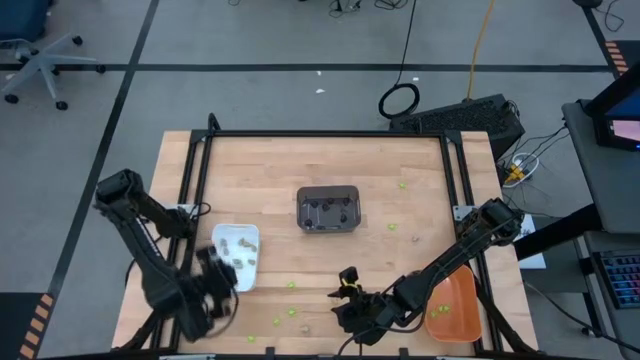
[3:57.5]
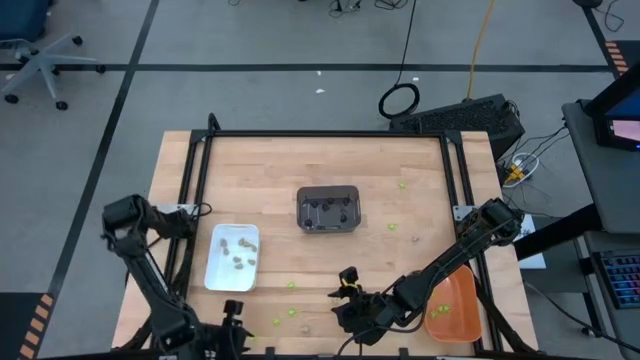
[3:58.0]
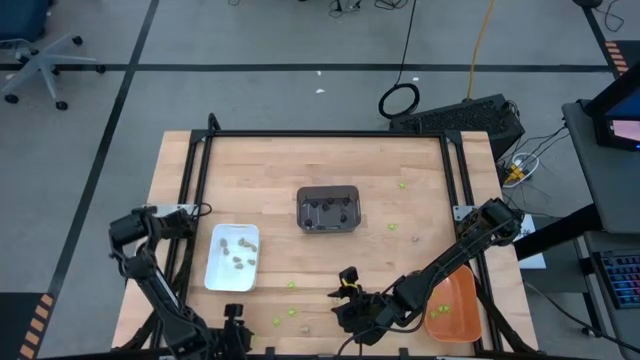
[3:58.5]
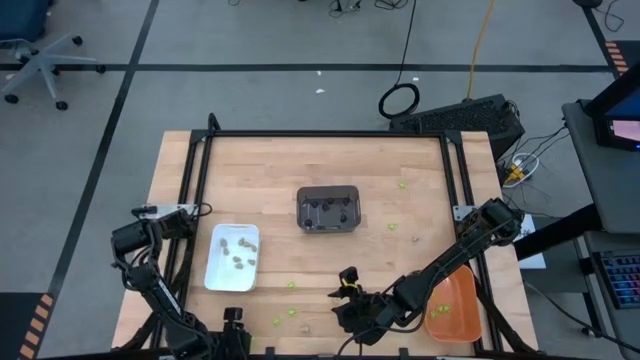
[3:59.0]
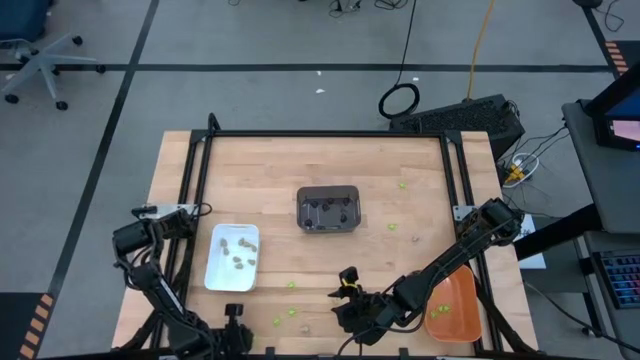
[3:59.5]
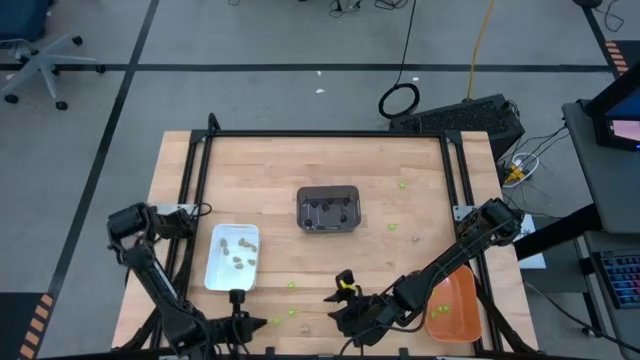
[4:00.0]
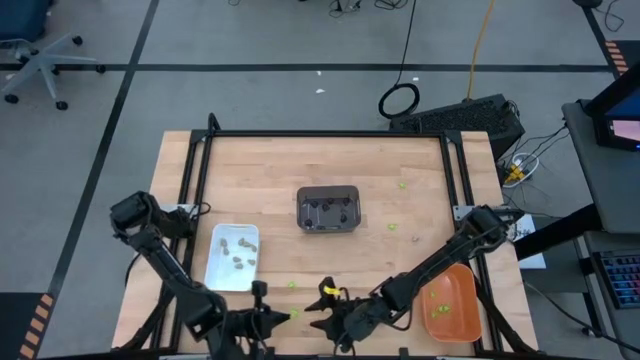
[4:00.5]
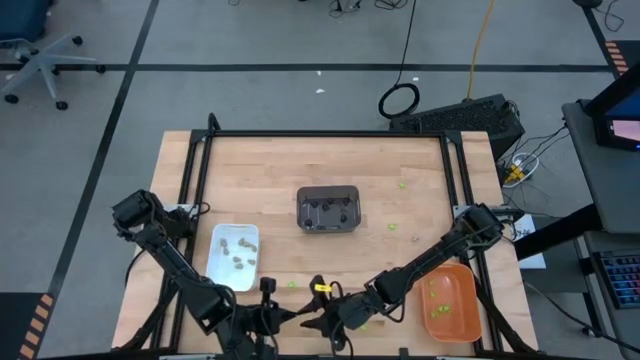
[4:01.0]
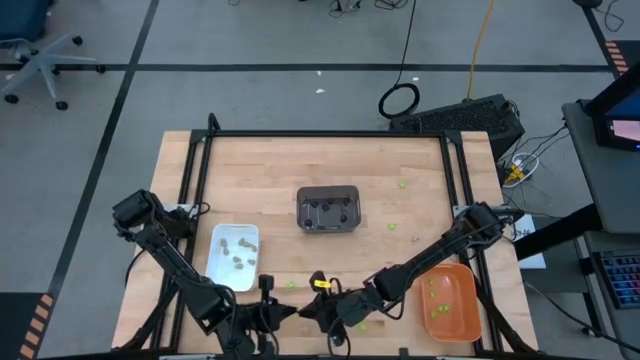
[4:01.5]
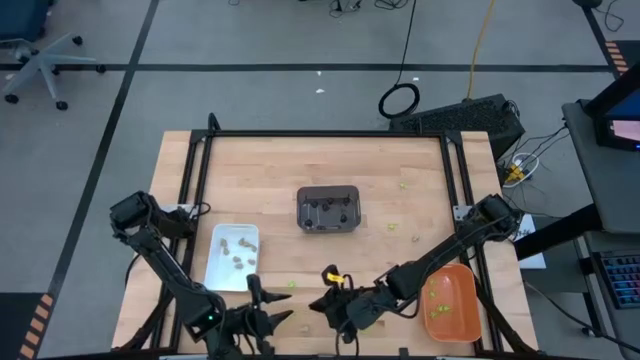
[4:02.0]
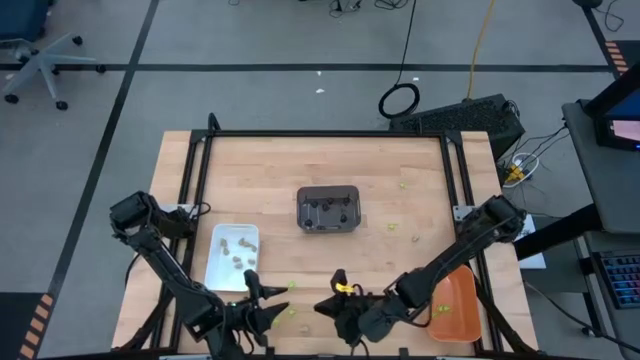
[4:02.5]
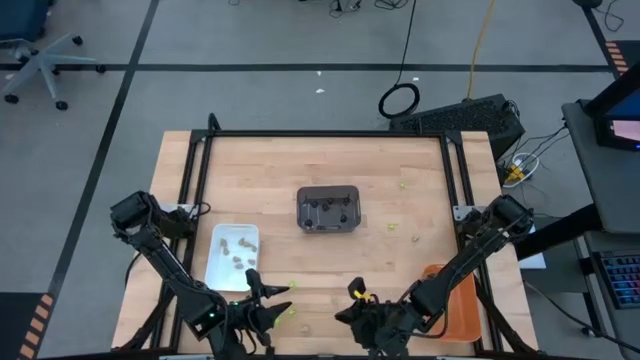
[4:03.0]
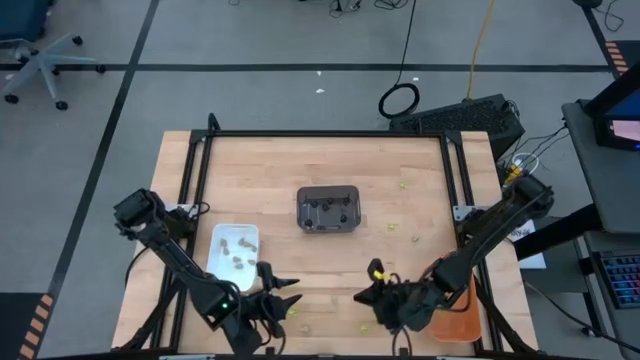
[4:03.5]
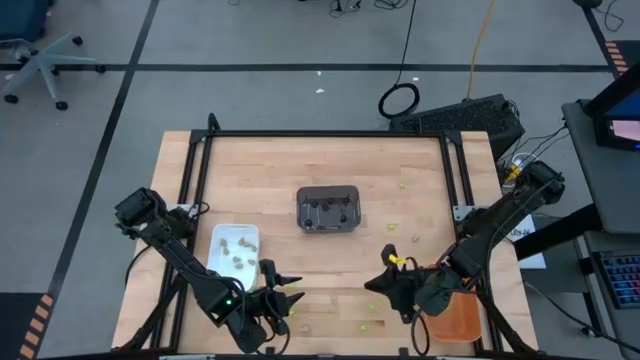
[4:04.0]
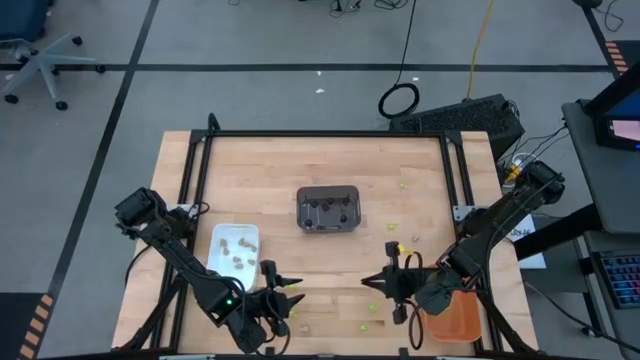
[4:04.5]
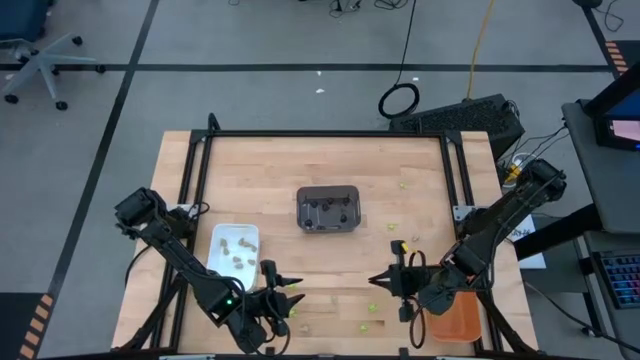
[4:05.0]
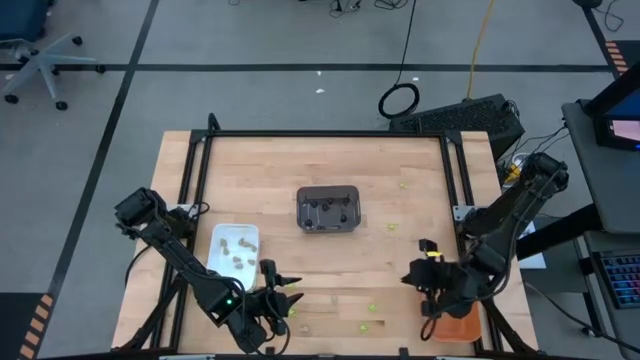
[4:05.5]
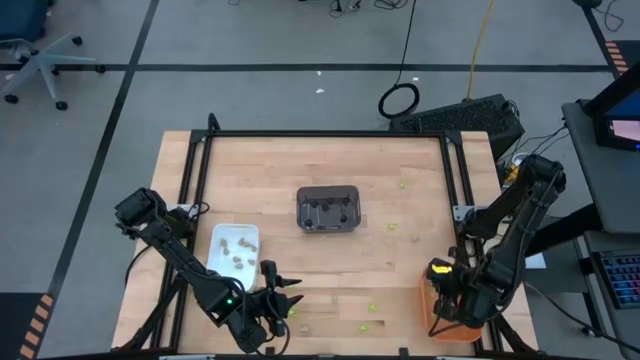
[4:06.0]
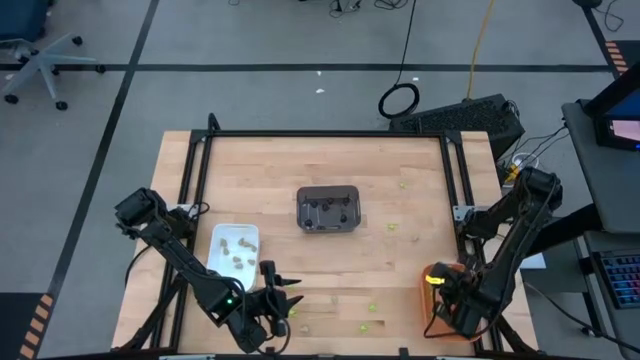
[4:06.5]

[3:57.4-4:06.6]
Task: Sort Halloween decoration
Put the green spider toy into the orange bin

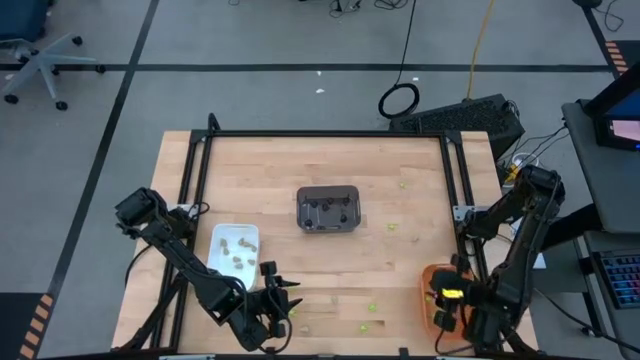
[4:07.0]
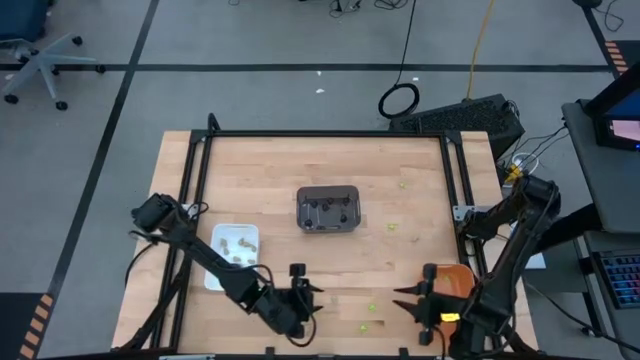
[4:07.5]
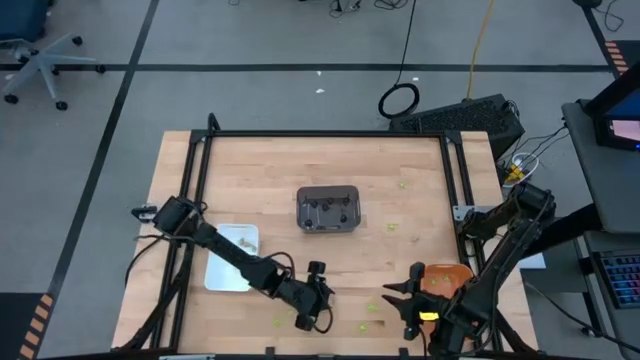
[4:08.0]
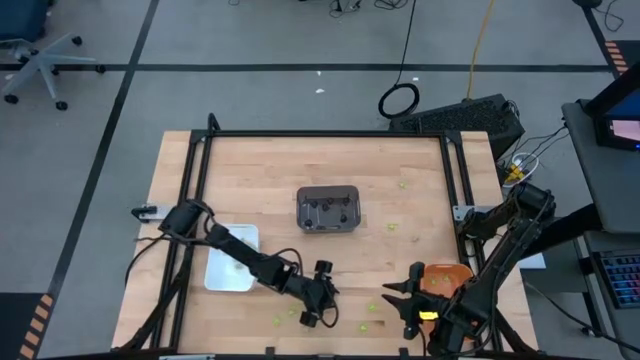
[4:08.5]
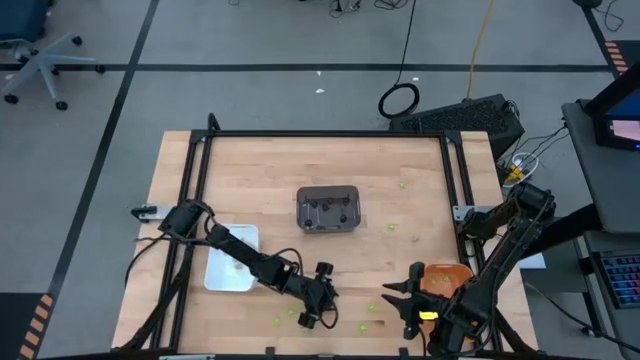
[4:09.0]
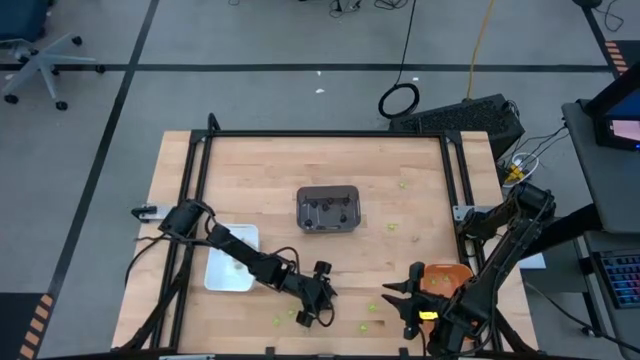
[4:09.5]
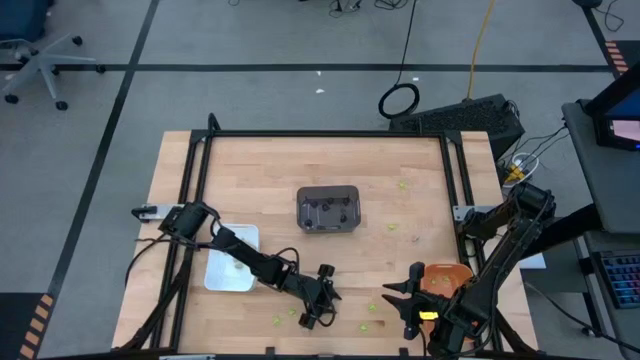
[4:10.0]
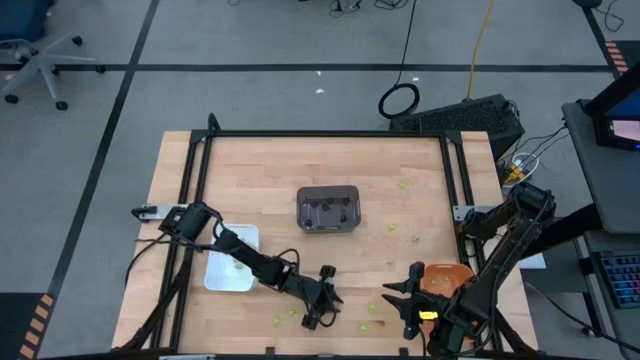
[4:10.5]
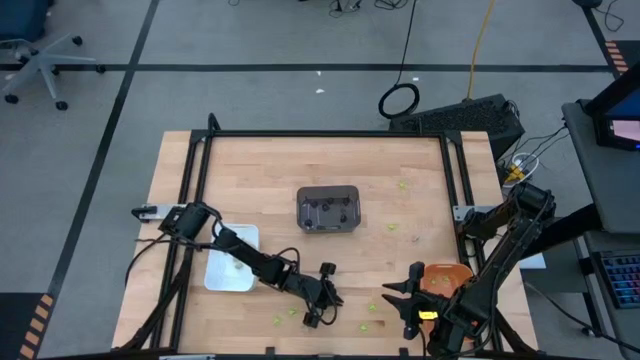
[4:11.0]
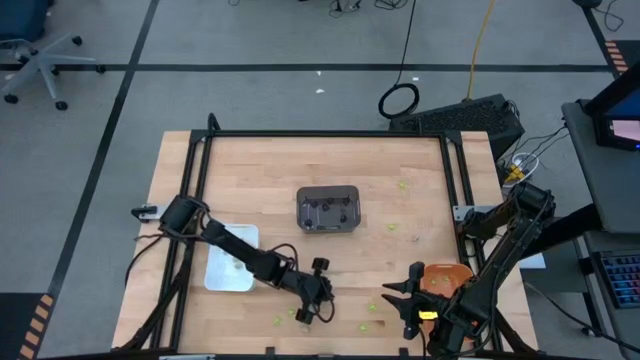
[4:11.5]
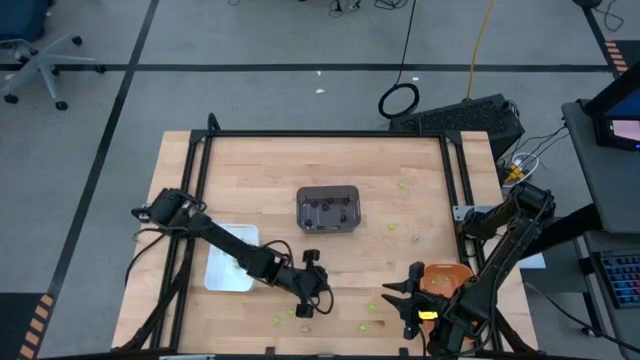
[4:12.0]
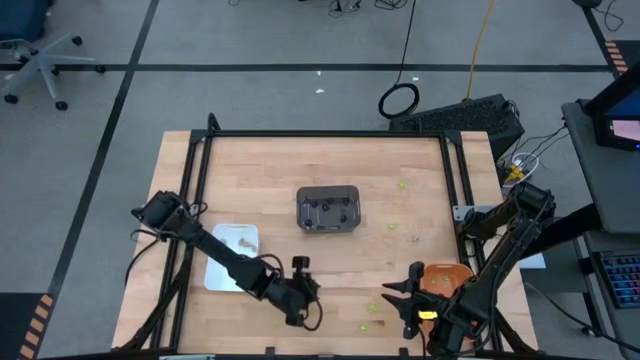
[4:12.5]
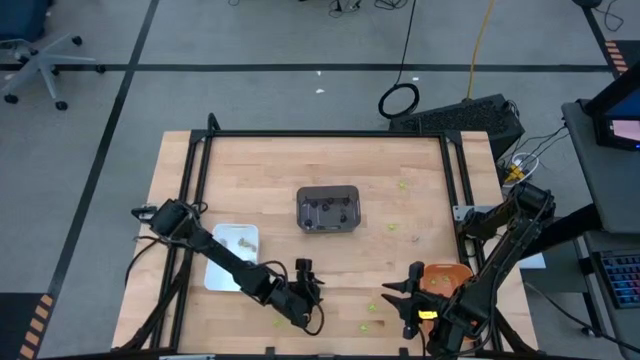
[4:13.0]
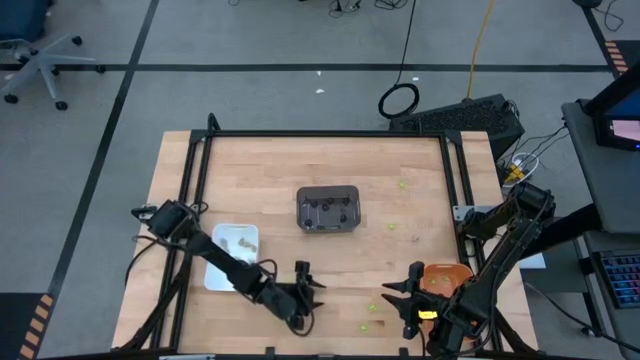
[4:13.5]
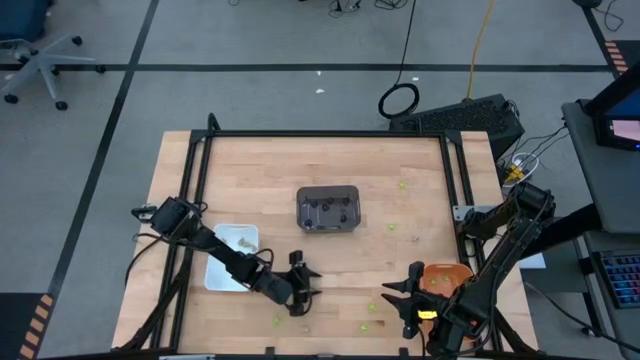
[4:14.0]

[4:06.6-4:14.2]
Put the white skull toy into the white bin

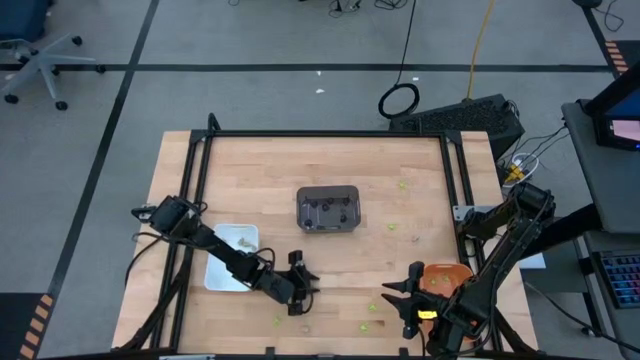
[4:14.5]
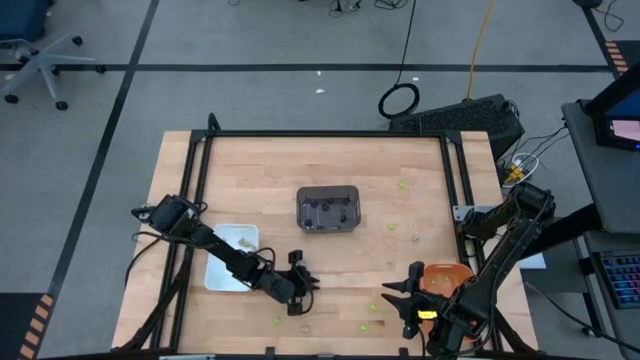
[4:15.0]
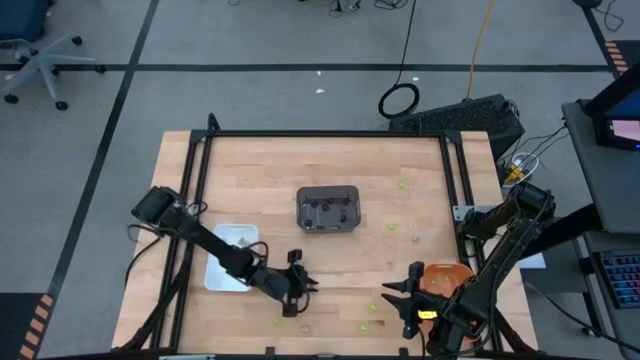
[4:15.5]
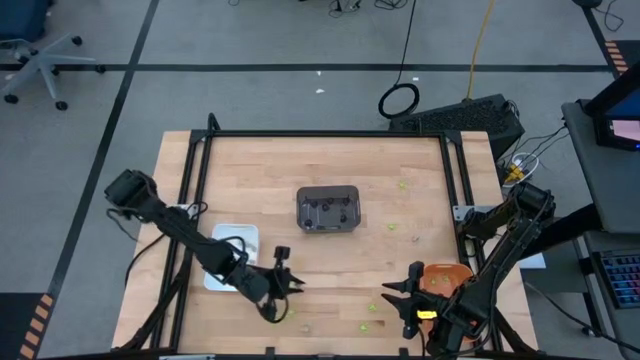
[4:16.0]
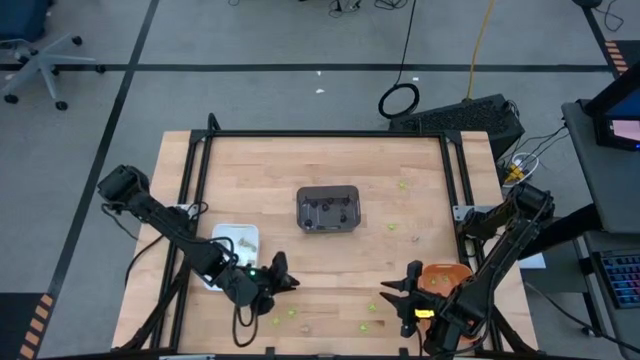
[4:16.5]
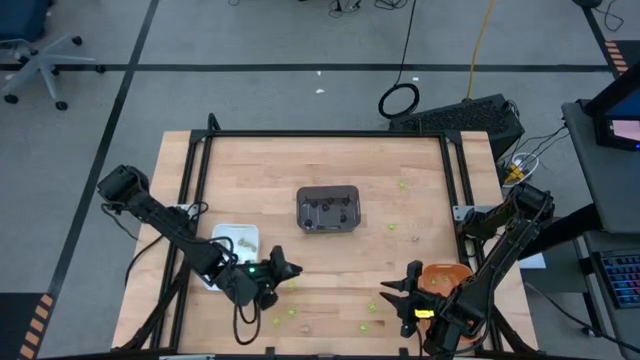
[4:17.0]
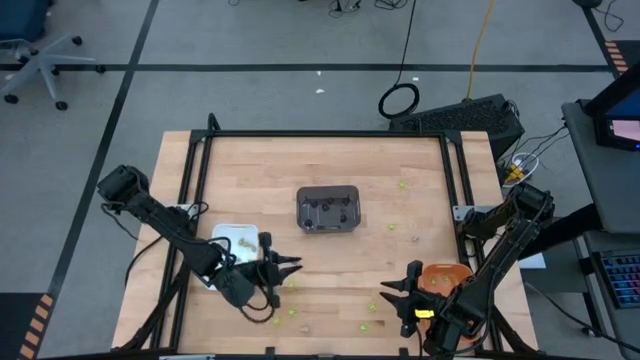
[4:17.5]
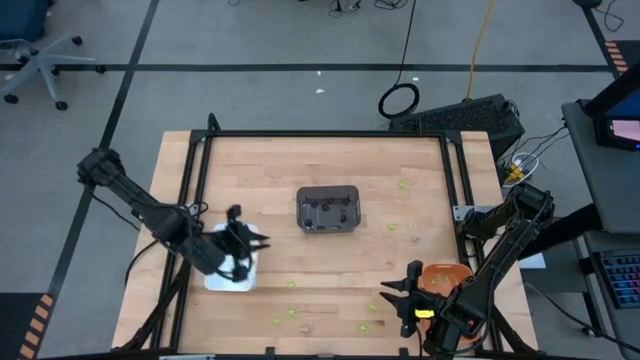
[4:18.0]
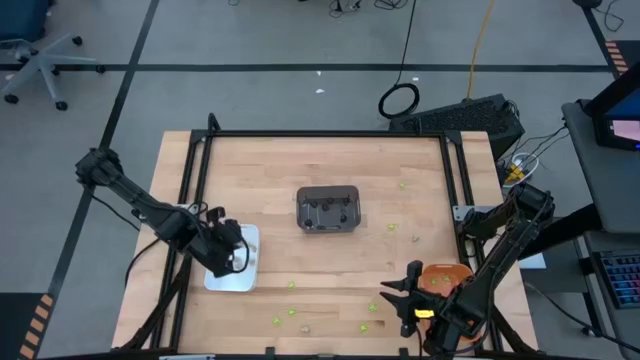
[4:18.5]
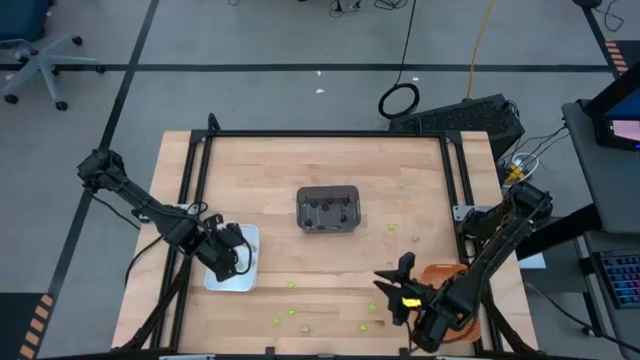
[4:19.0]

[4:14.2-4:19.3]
Put the white skull toy into the white bin
